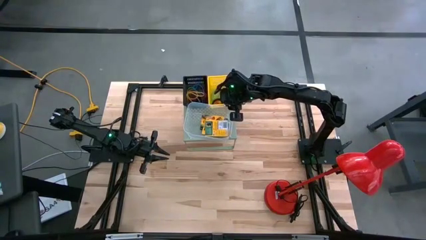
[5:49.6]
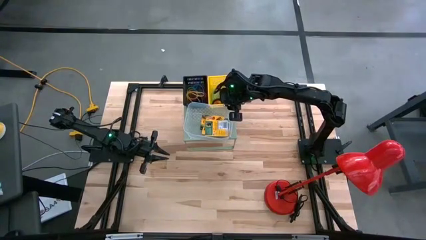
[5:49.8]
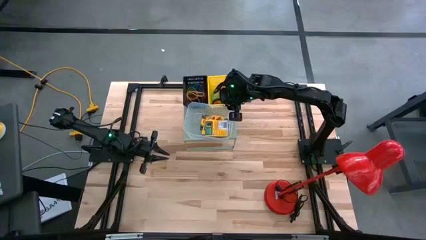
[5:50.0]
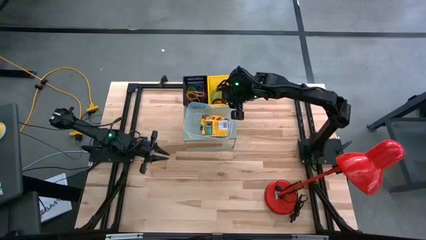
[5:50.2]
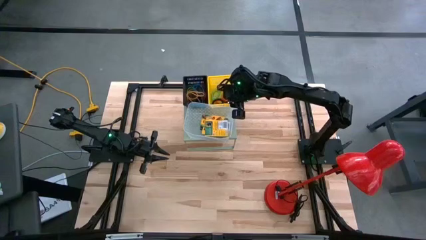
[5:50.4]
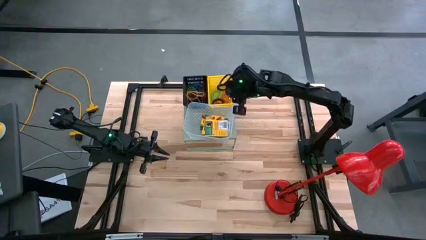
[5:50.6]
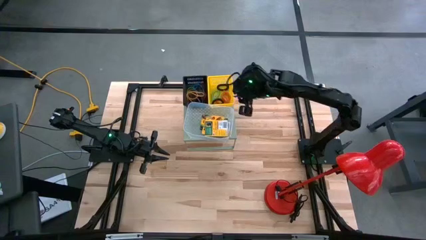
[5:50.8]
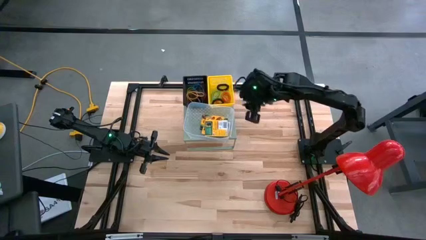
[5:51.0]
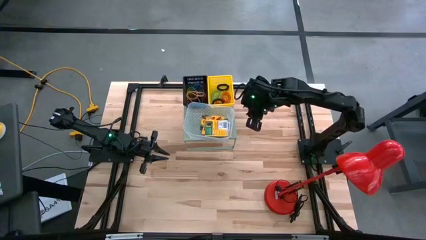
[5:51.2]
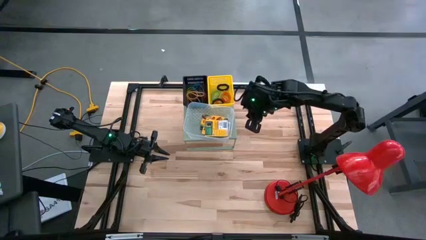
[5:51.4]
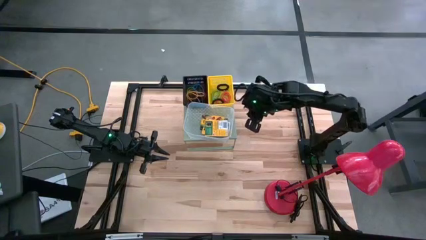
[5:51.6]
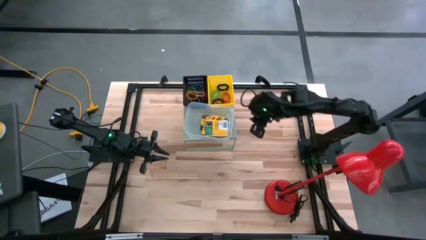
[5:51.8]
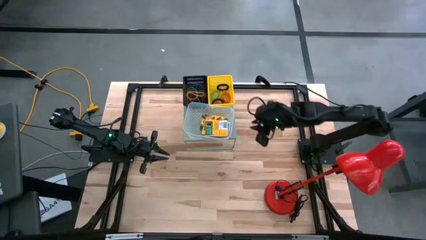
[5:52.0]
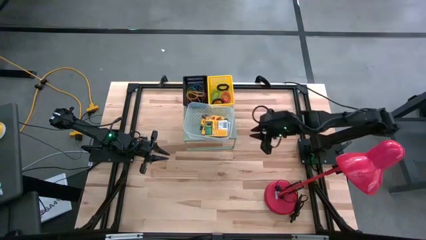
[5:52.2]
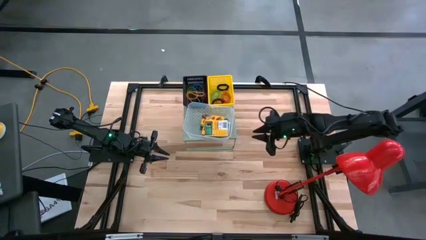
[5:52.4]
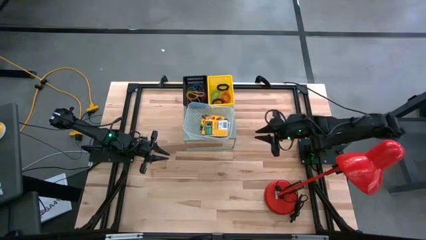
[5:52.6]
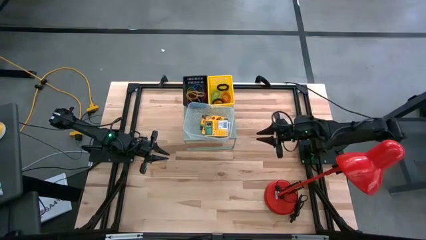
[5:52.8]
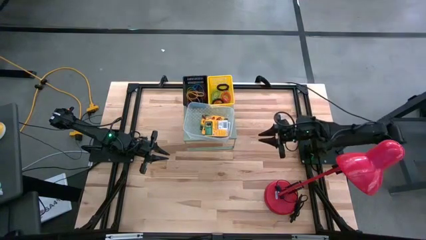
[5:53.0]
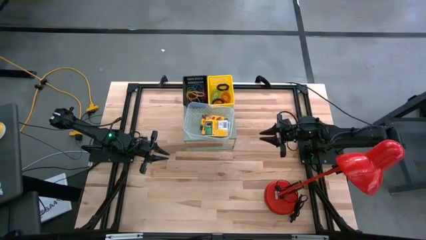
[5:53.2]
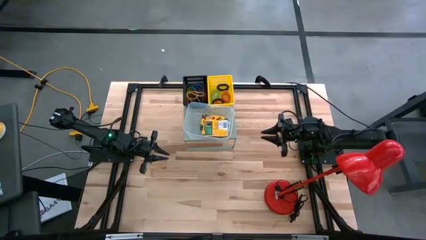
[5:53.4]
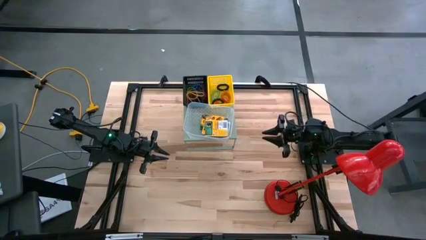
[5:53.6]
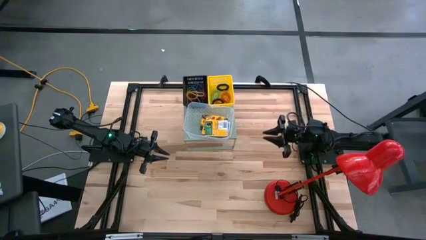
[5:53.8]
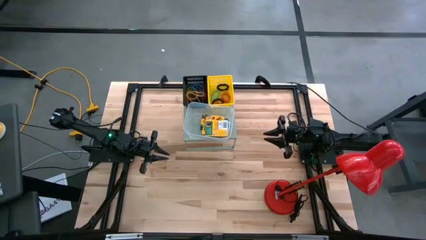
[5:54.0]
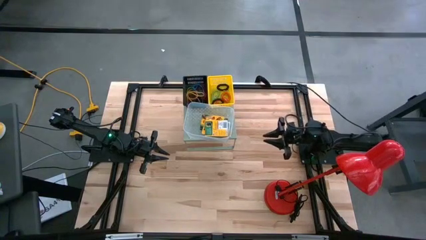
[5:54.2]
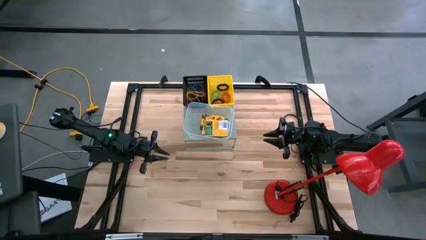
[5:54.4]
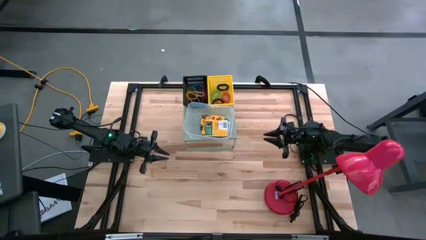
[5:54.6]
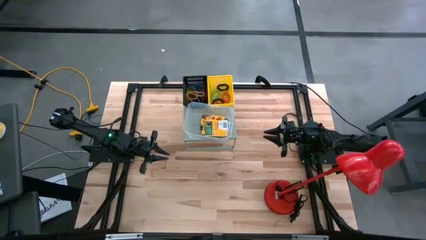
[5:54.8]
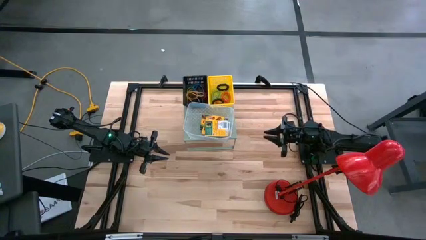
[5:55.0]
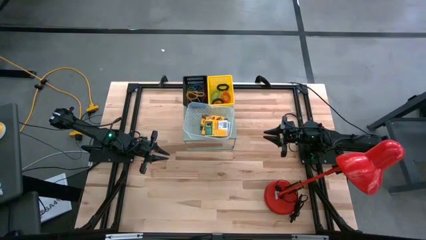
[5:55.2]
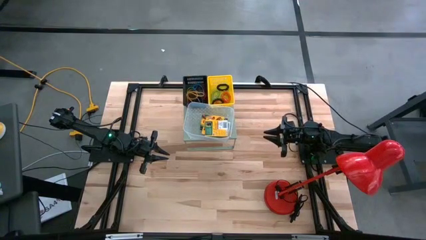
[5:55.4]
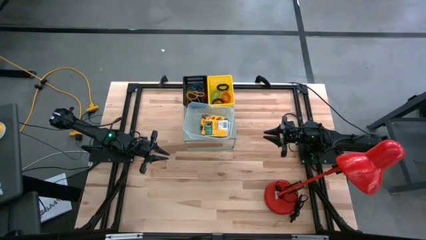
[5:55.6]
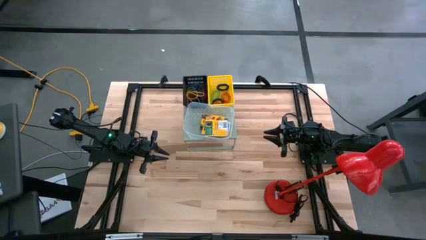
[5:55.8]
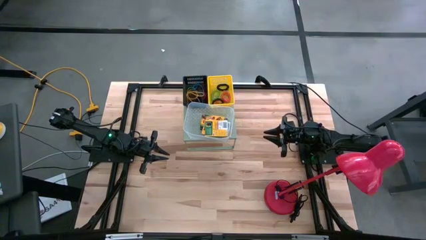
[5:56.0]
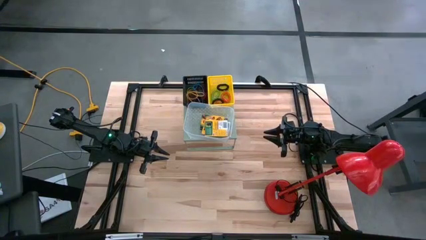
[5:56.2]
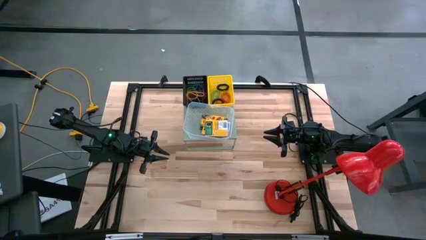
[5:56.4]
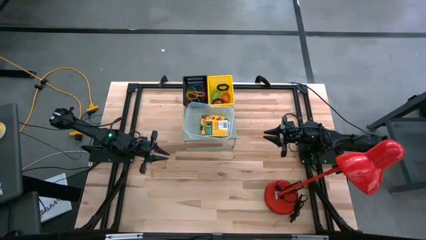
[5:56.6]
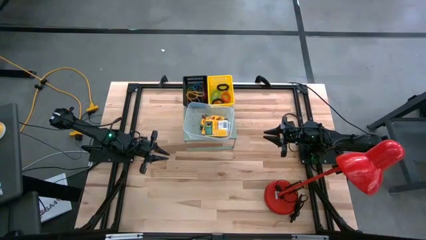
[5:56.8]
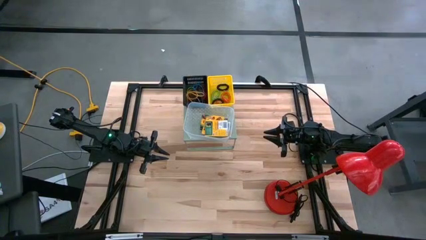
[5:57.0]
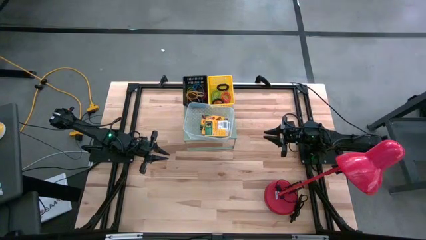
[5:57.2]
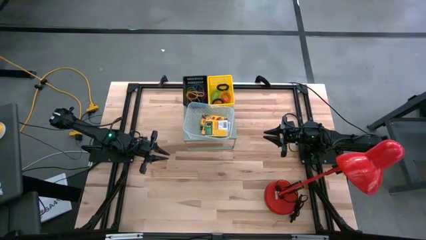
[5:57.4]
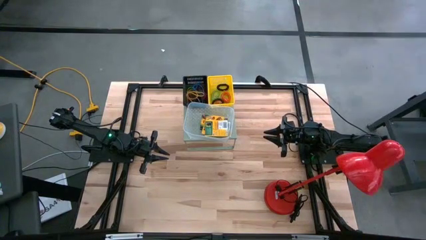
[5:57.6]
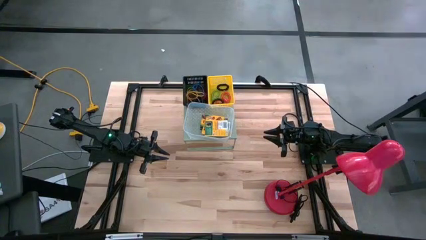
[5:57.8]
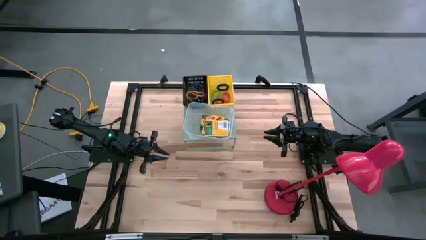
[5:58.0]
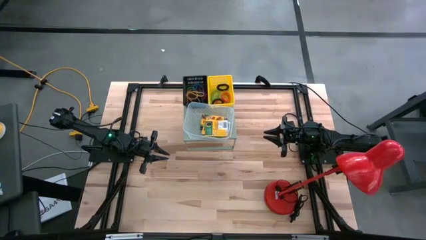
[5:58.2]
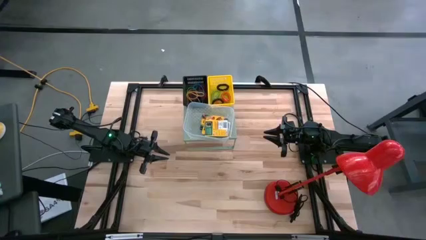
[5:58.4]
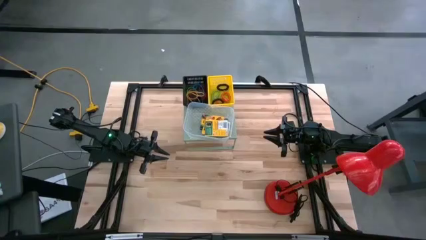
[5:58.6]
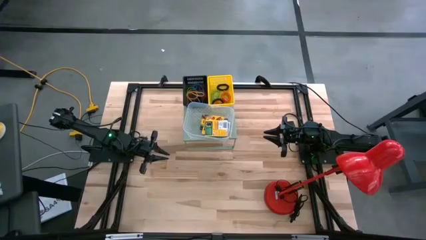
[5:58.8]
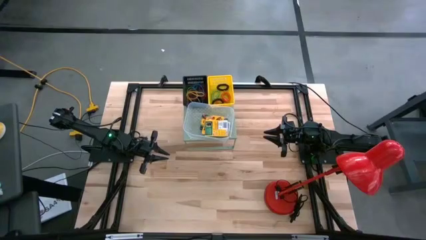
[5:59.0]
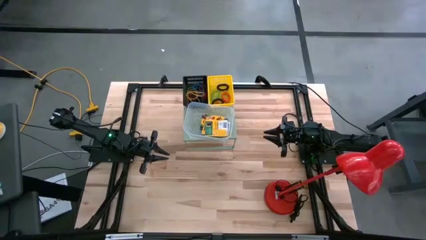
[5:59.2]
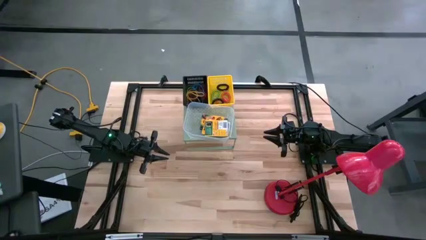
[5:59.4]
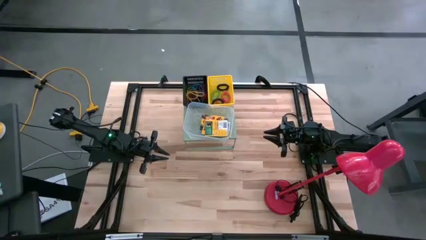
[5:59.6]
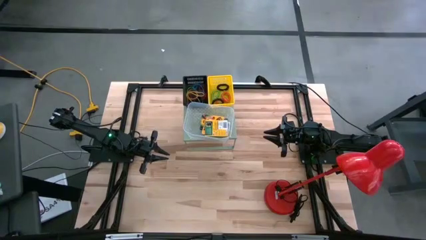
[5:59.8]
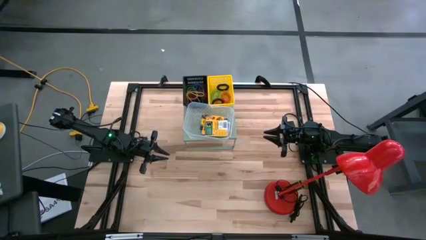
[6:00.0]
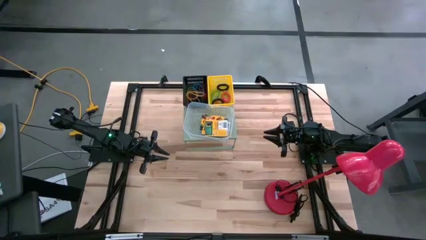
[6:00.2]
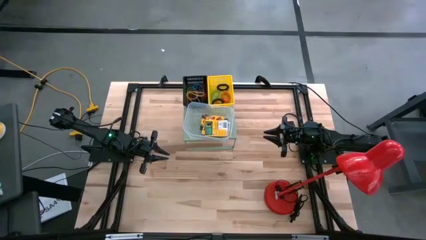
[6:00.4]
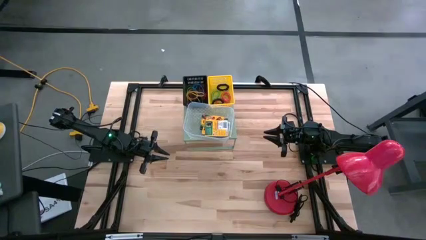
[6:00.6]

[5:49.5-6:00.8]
Task: Pick & Place Office Desk Supplies
Return to Home Position
